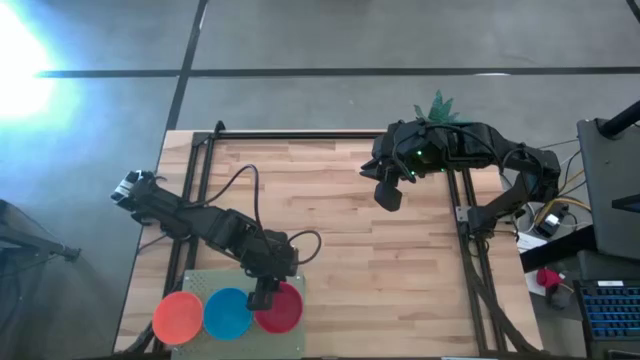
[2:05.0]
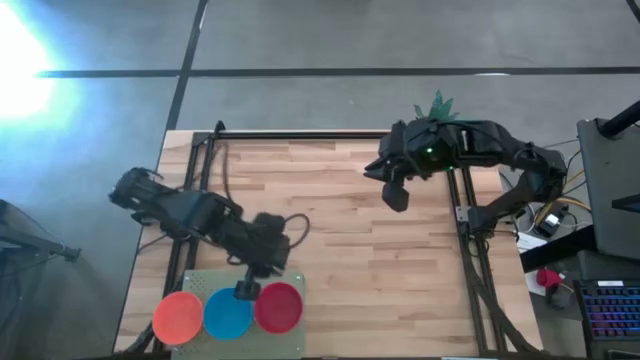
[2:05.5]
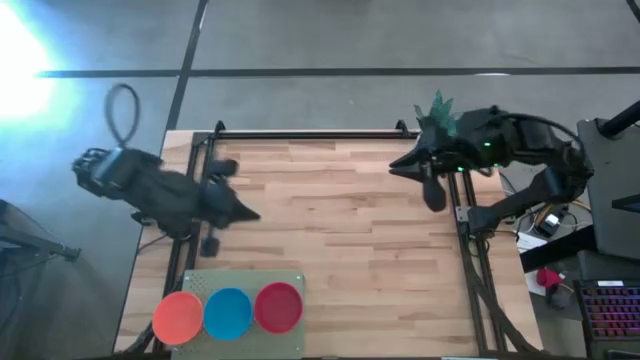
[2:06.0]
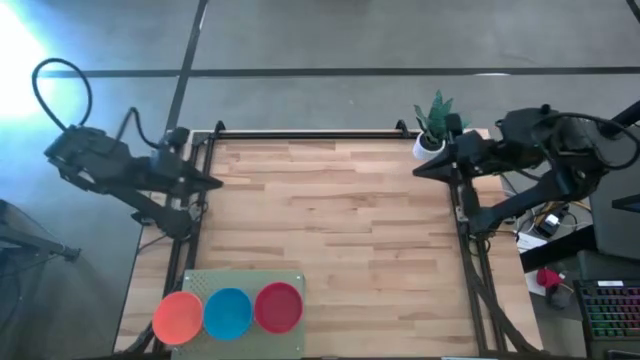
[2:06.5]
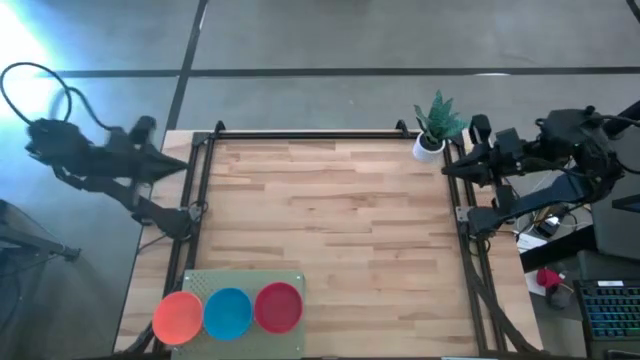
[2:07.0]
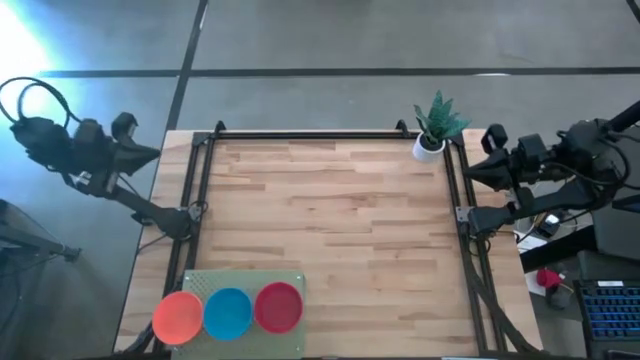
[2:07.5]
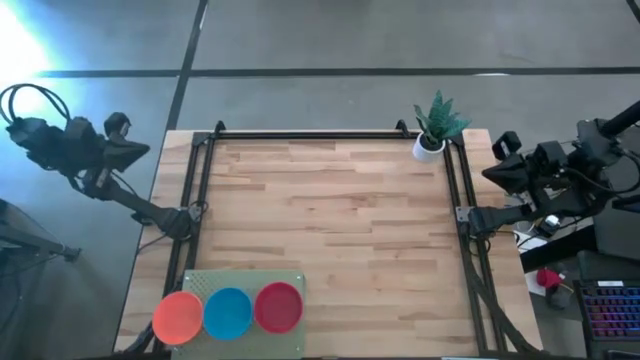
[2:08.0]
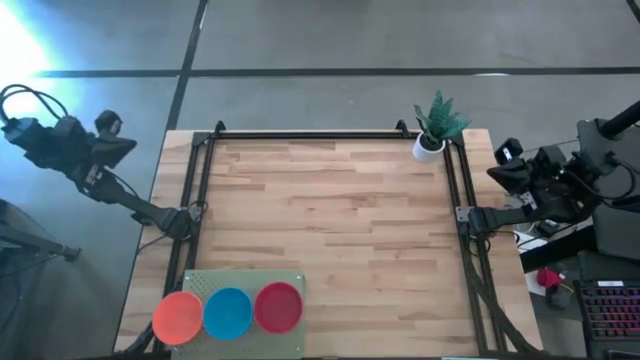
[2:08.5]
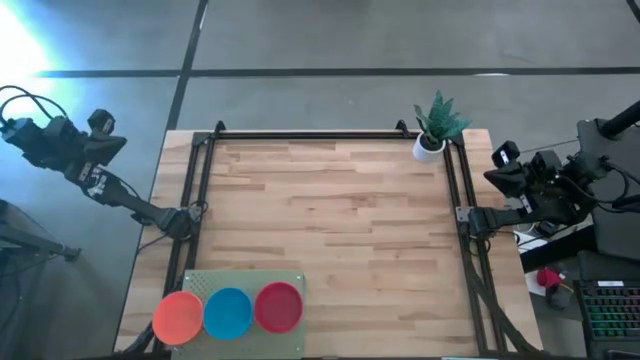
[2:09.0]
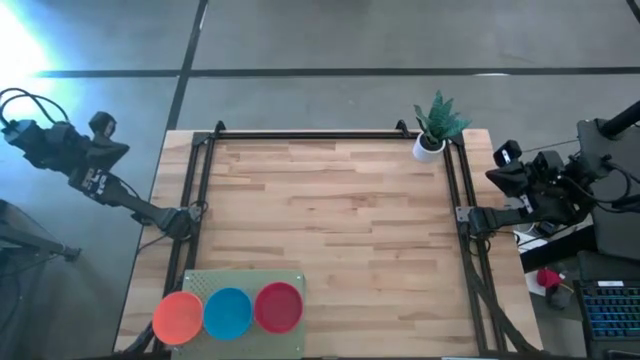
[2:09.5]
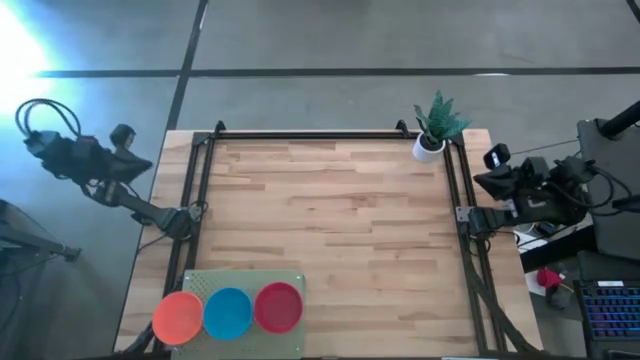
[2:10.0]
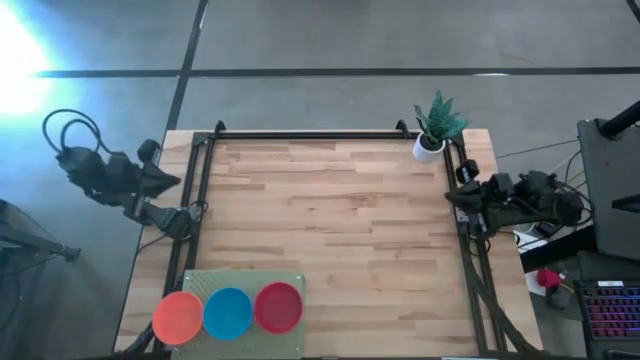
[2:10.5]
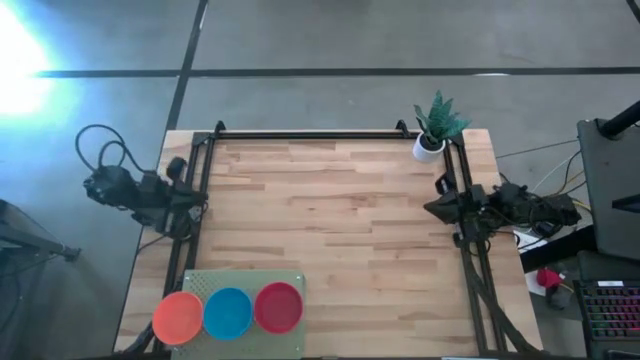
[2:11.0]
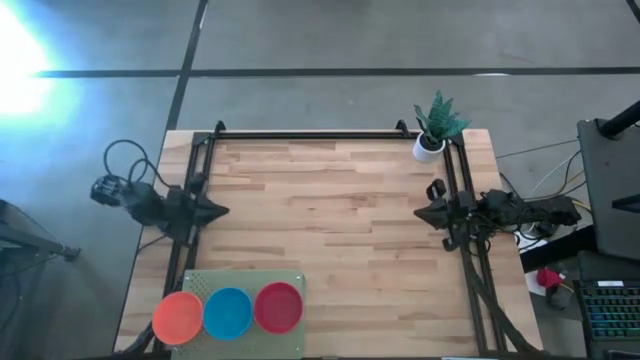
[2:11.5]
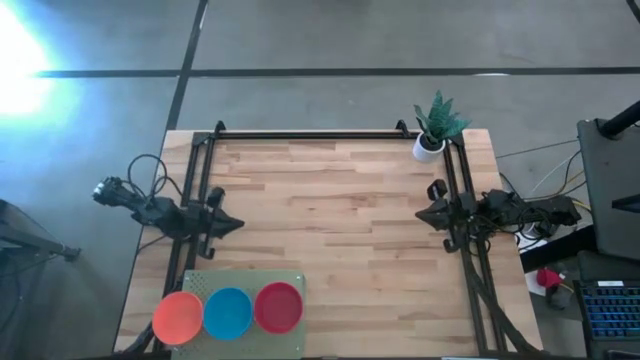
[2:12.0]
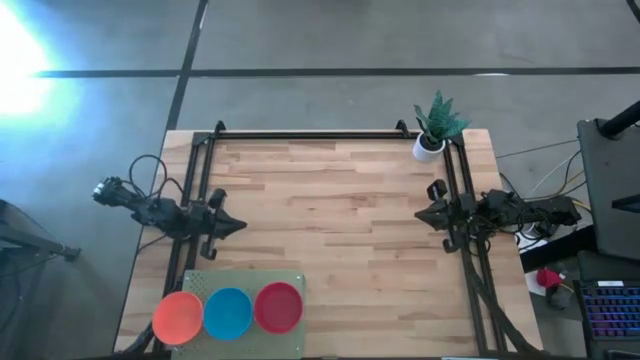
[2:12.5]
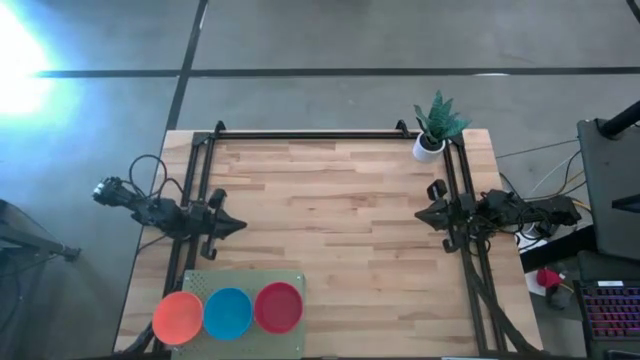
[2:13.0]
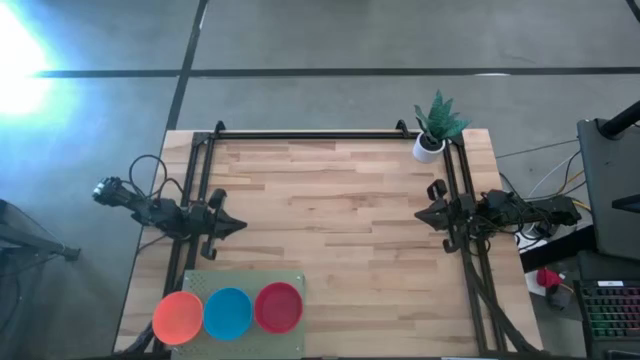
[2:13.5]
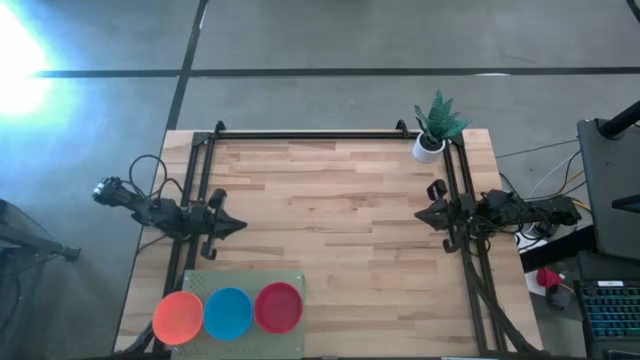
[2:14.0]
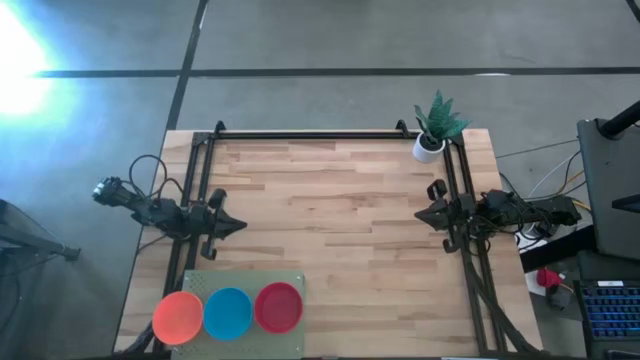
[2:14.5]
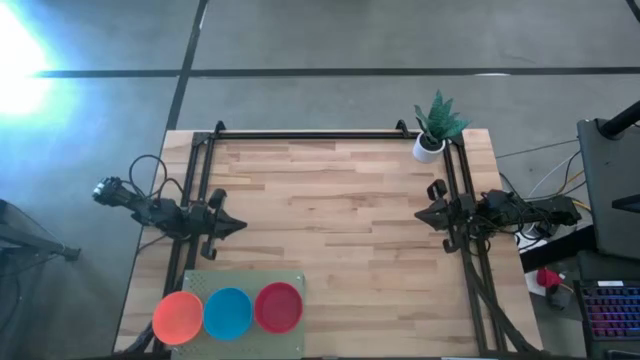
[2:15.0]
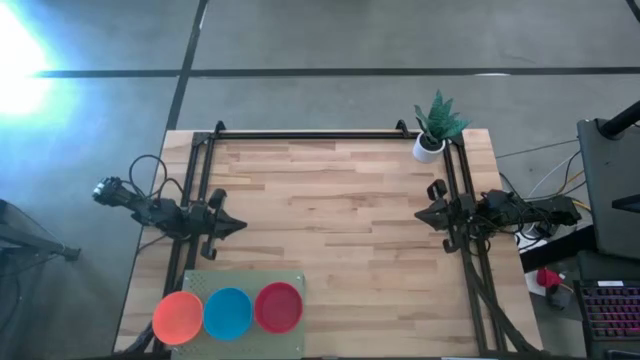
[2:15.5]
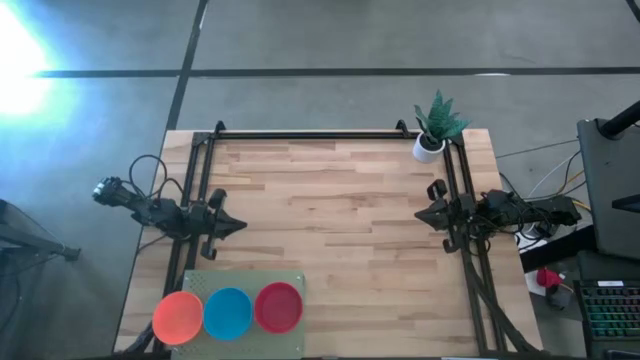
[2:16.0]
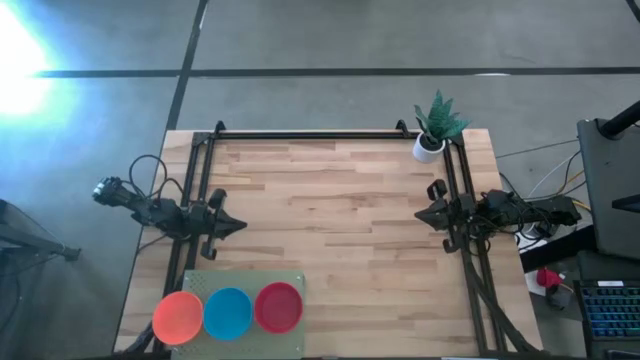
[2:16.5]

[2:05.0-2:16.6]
Task: Pick & Place Mini bowls
Return to Home Position

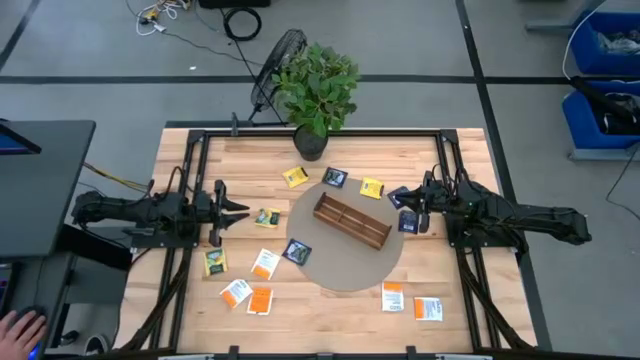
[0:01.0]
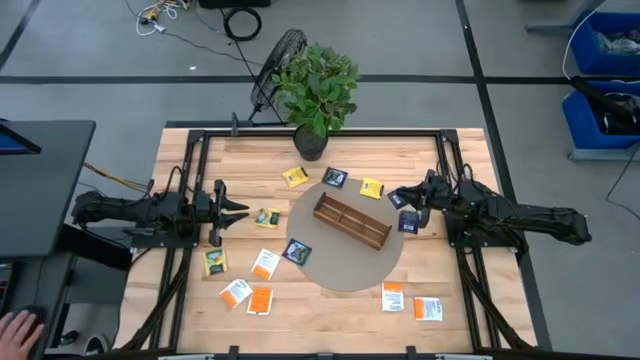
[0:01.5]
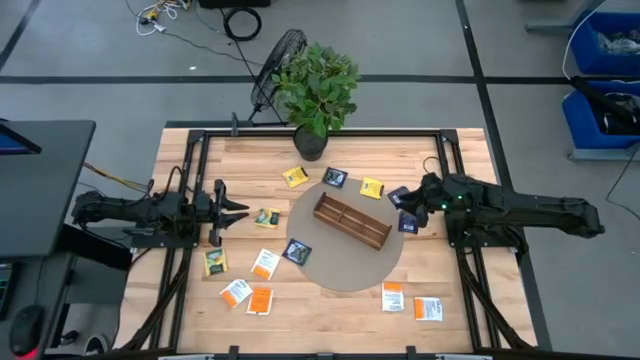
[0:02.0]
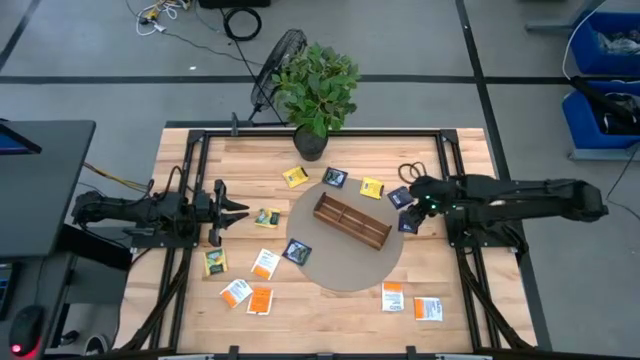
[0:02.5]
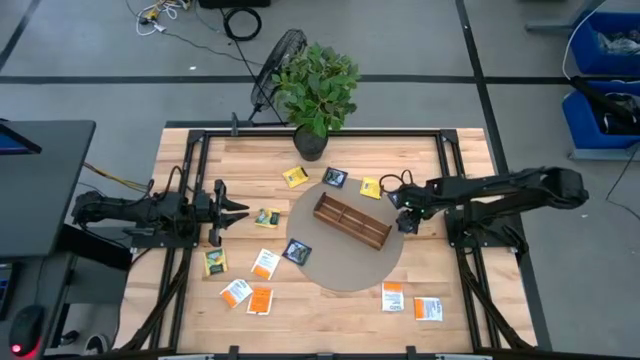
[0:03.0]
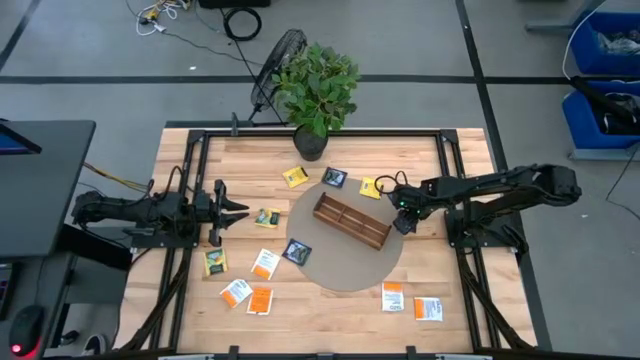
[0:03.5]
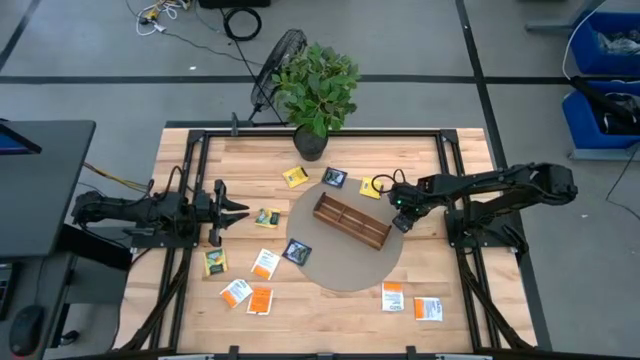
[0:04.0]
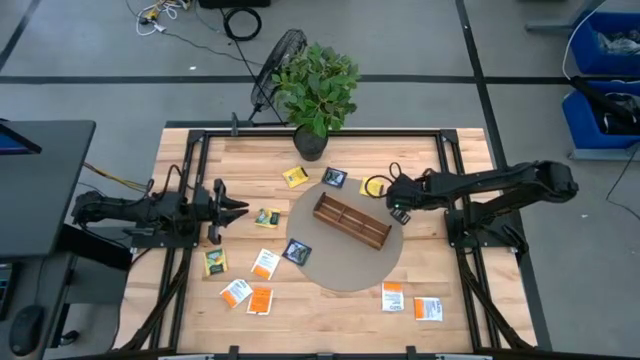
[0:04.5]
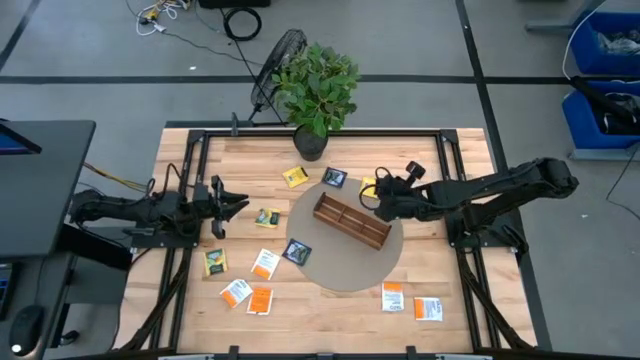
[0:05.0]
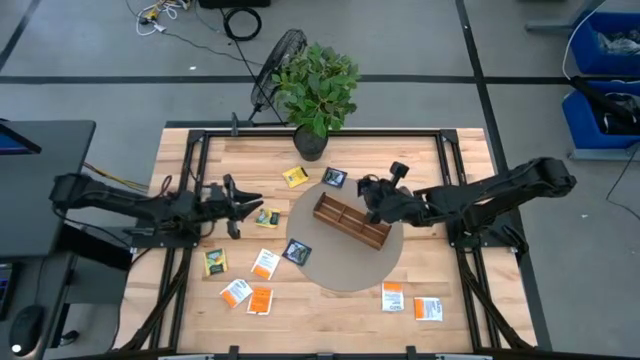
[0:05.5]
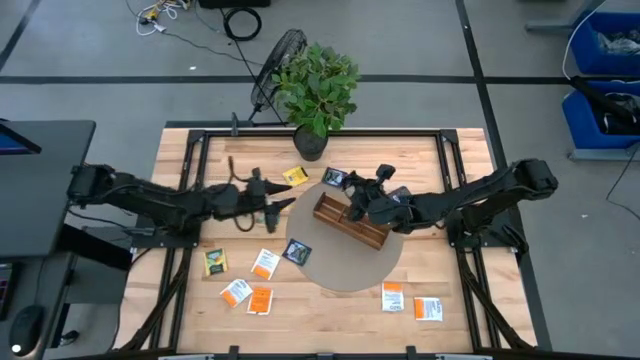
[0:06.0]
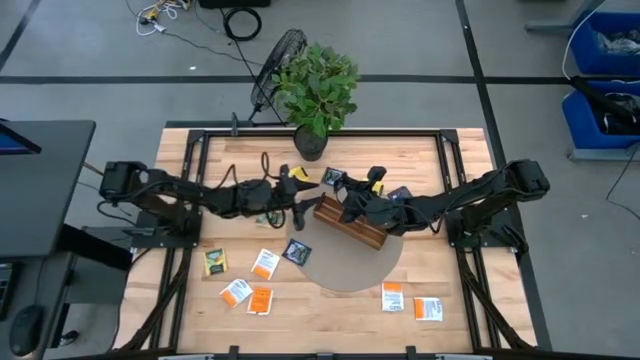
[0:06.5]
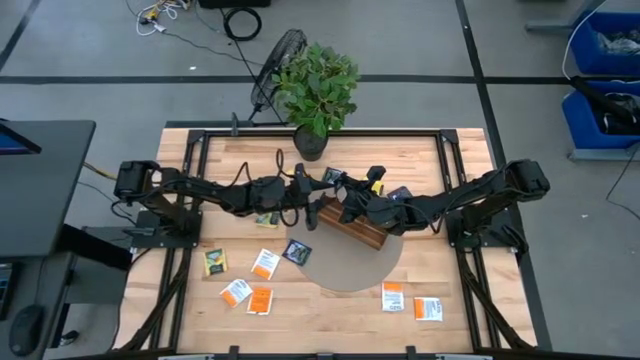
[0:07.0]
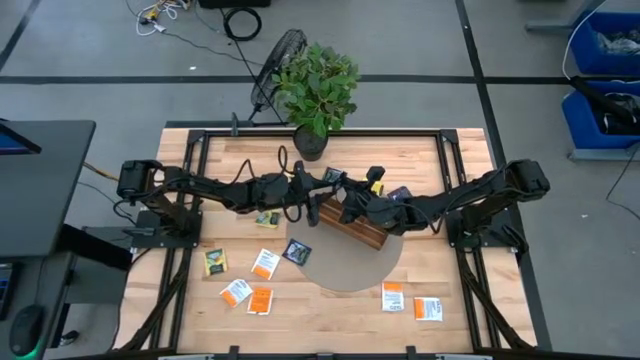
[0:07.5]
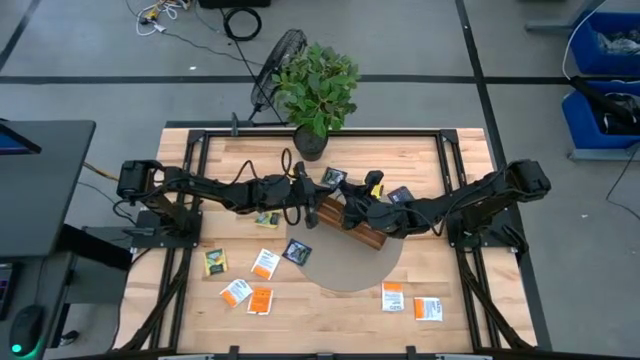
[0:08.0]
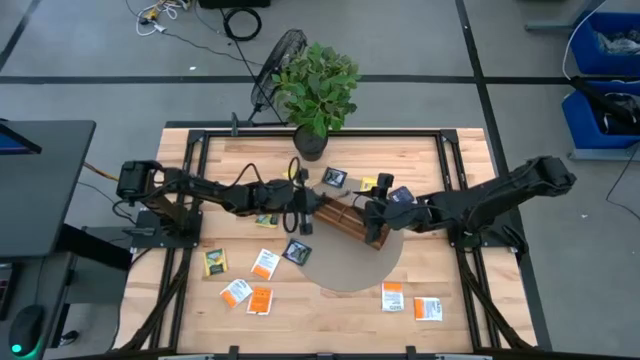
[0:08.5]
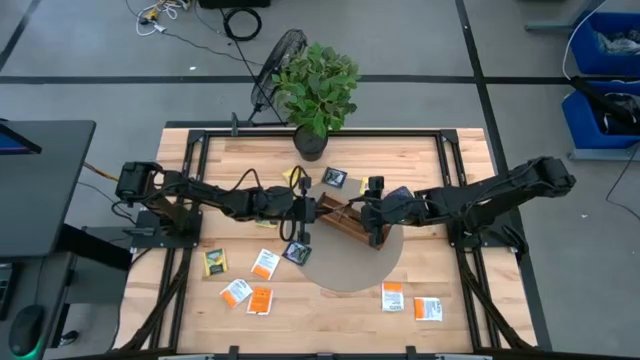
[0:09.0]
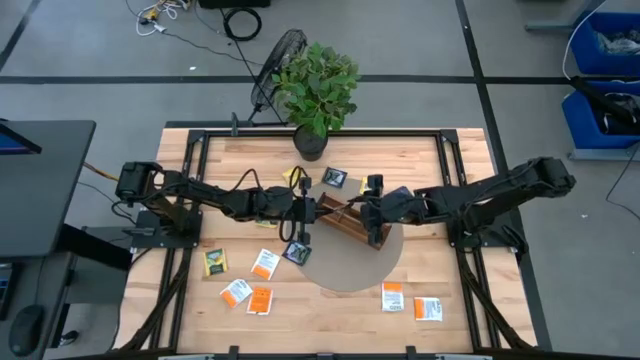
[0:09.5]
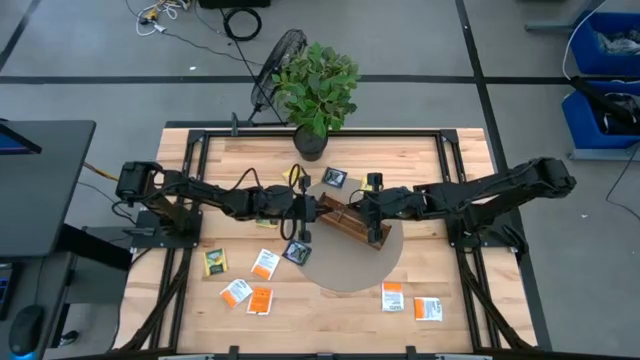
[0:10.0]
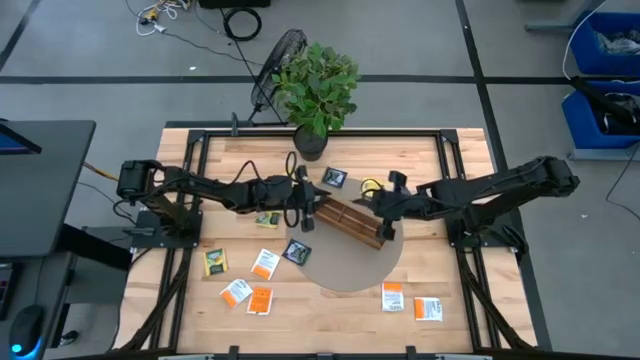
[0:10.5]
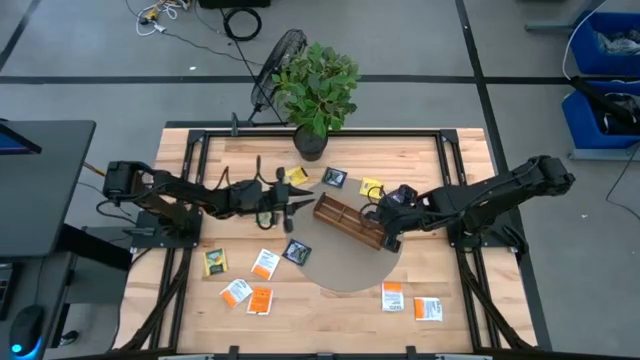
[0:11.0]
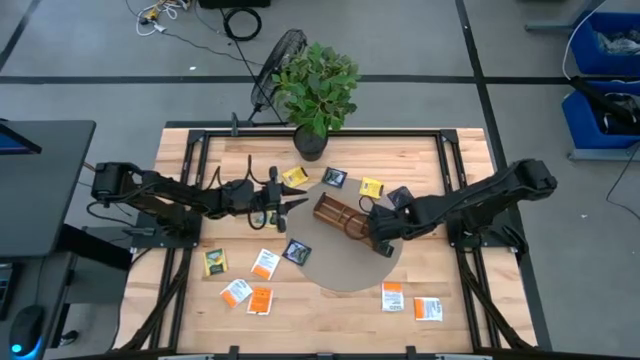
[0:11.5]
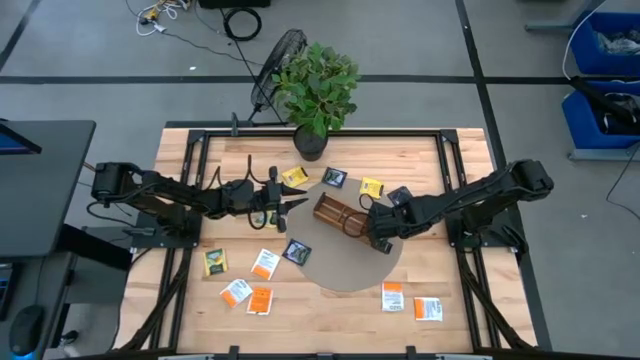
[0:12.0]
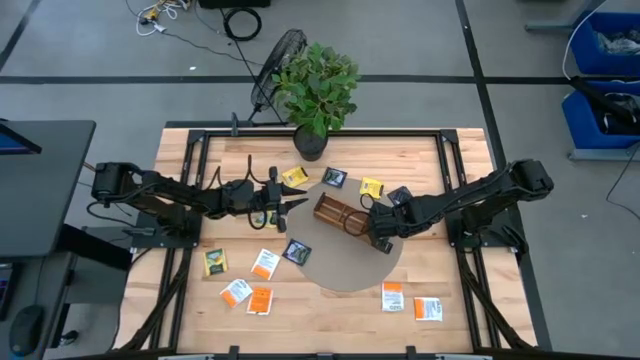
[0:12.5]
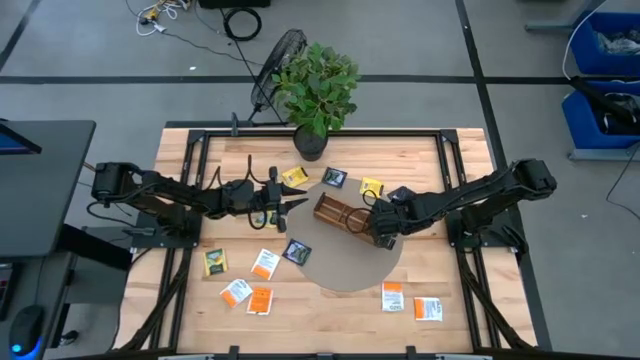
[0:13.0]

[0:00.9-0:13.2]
Task: Pick & Place Tea
Put the black tea bag into the right section of the wooden organizer
